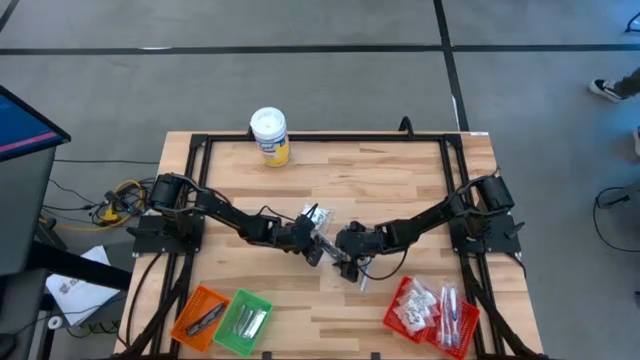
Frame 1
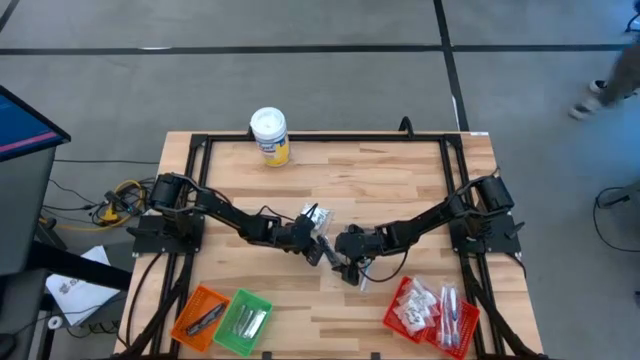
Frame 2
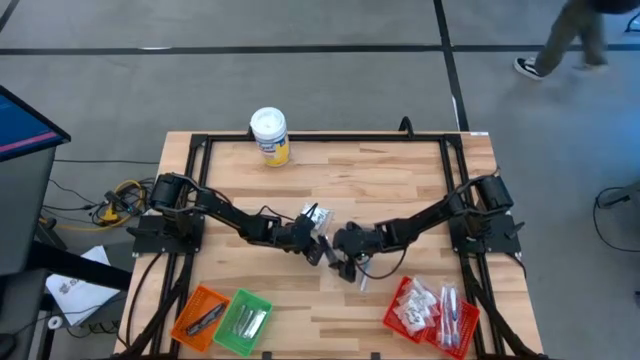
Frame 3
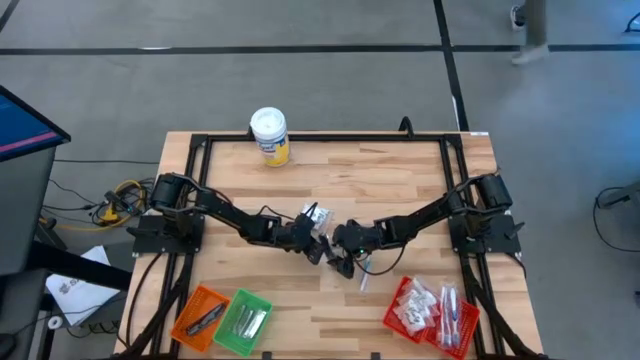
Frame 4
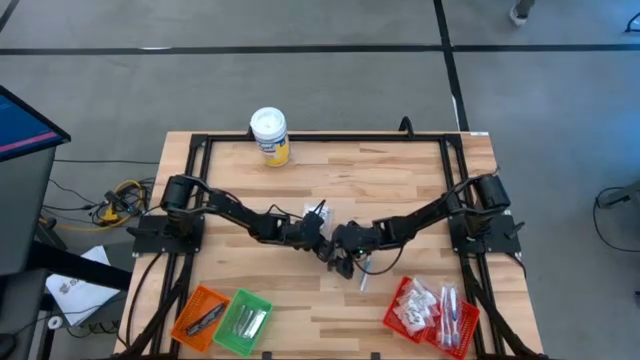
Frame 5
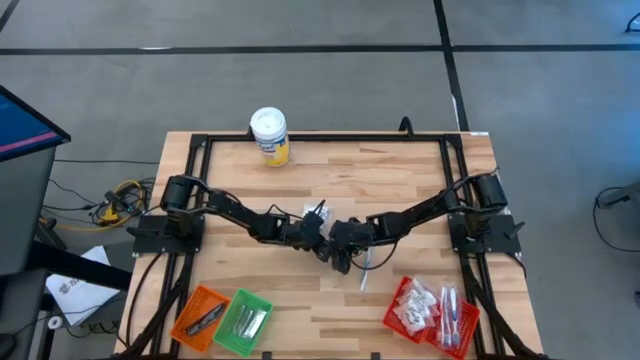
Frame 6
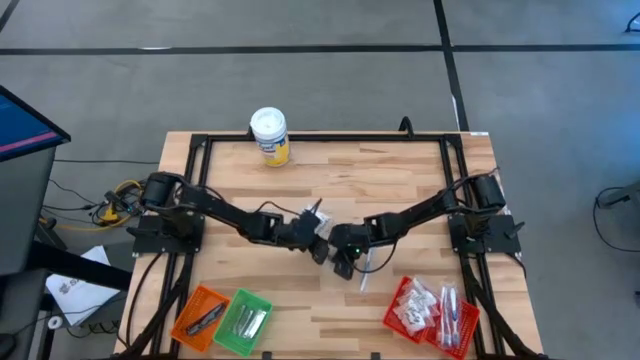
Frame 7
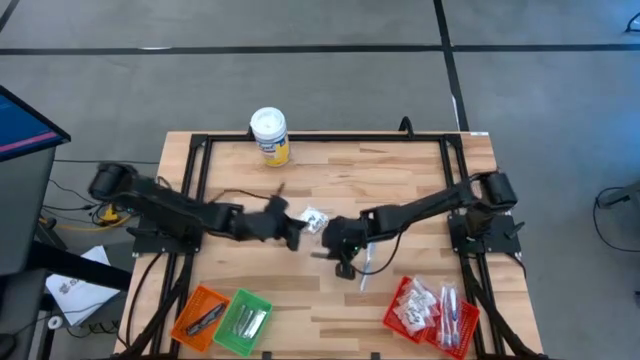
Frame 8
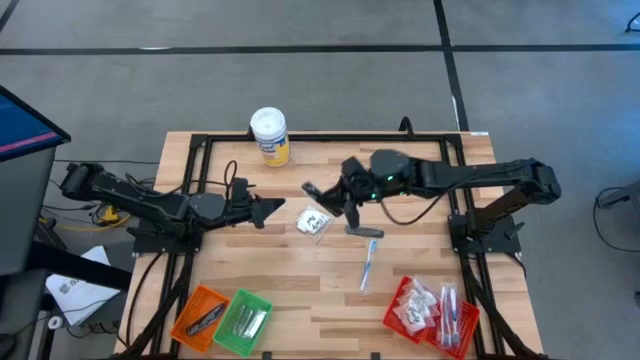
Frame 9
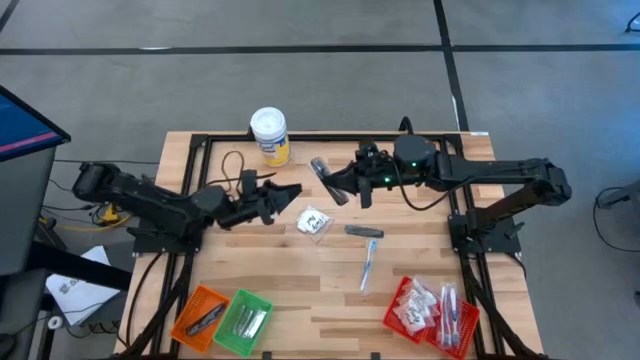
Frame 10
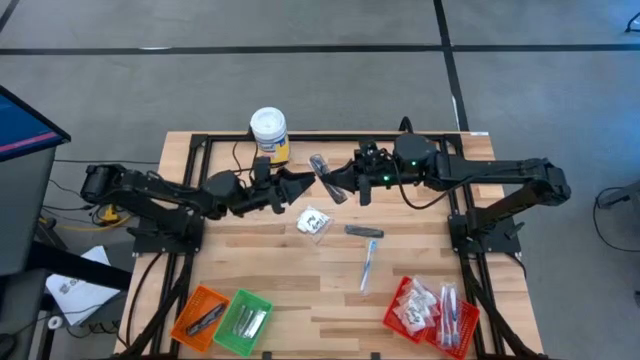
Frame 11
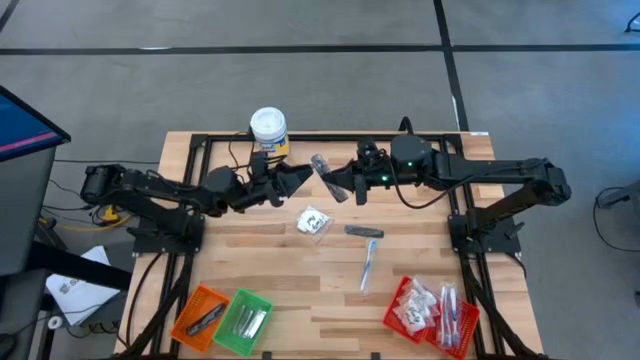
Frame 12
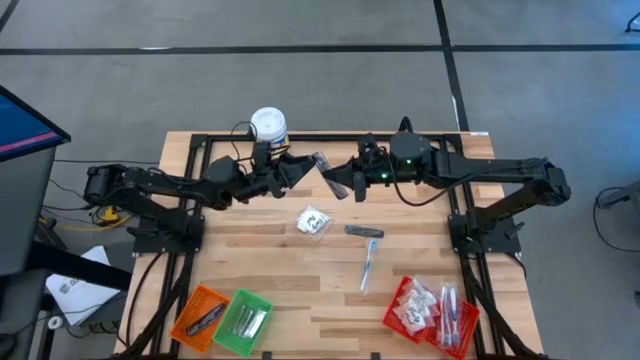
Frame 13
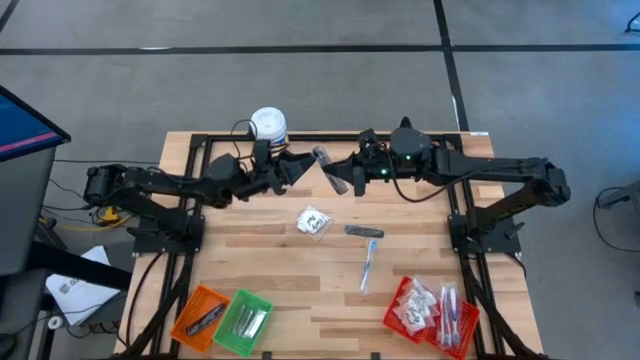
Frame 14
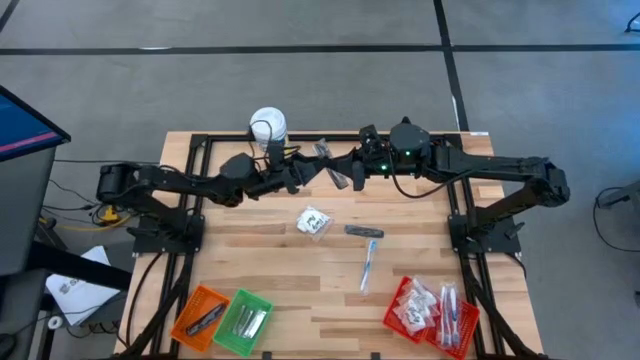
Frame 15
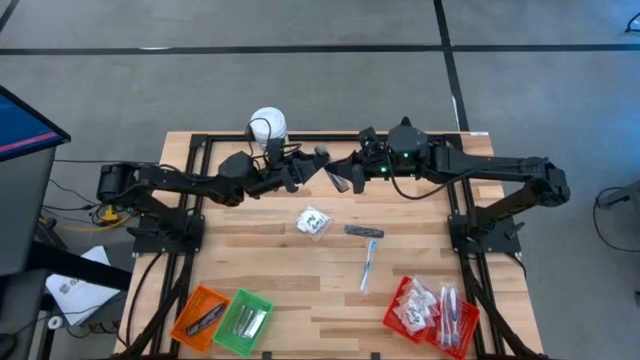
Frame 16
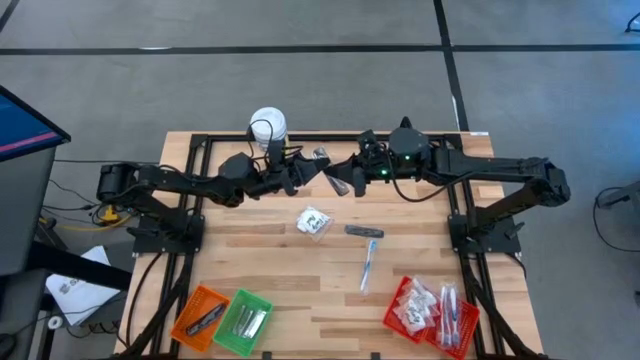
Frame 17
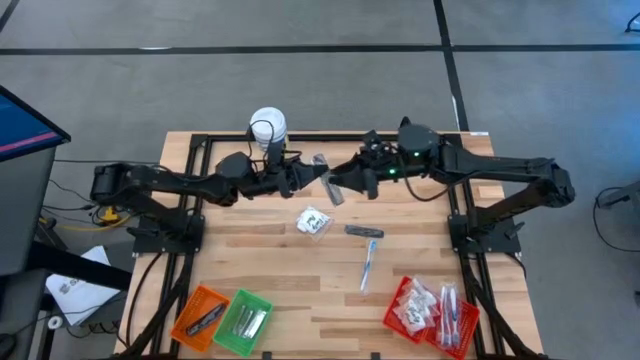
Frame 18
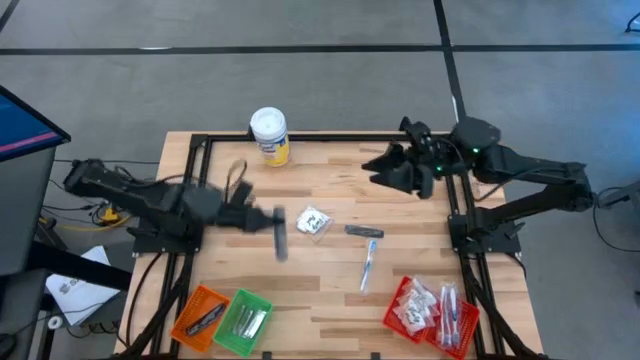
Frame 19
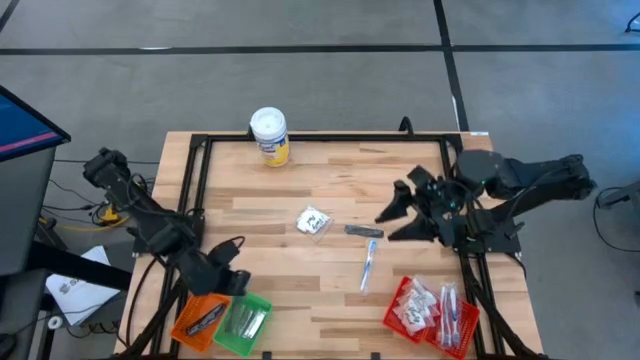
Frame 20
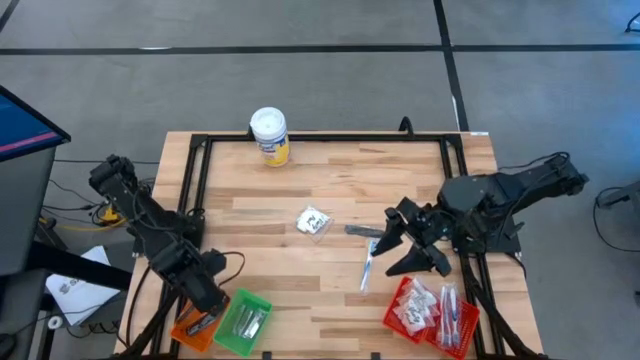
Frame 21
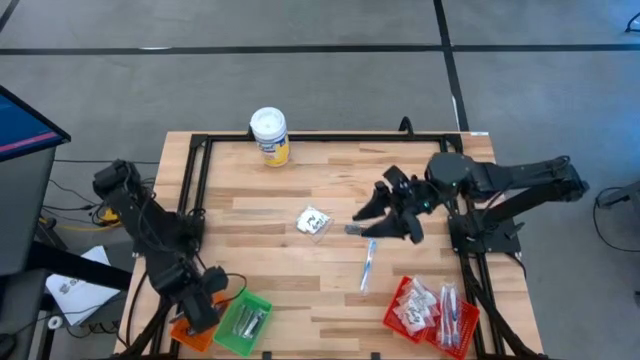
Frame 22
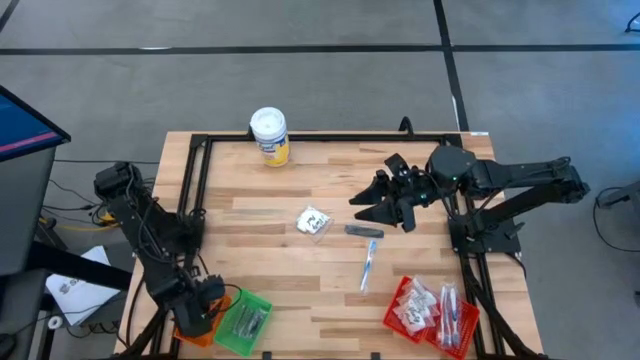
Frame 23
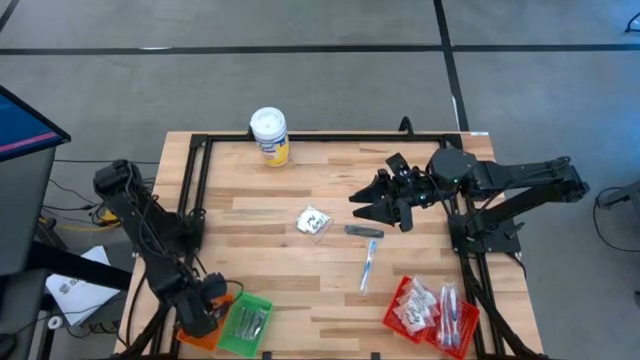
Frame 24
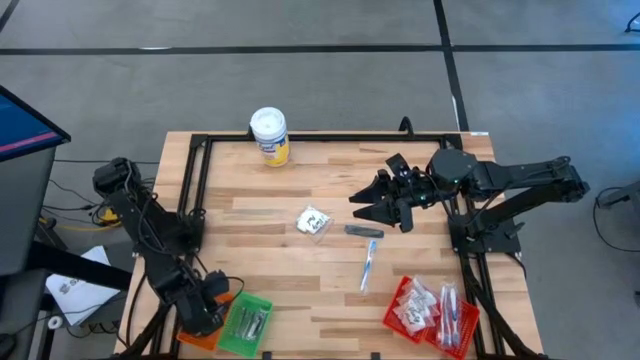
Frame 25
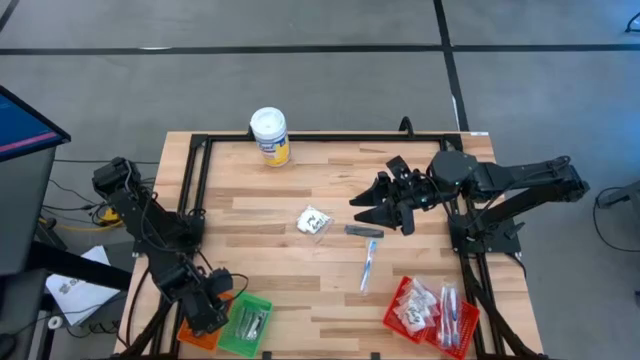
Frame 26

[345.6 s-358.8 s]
Task: Pick & Place Travel size toiletries
Put the black comb into the orange basket

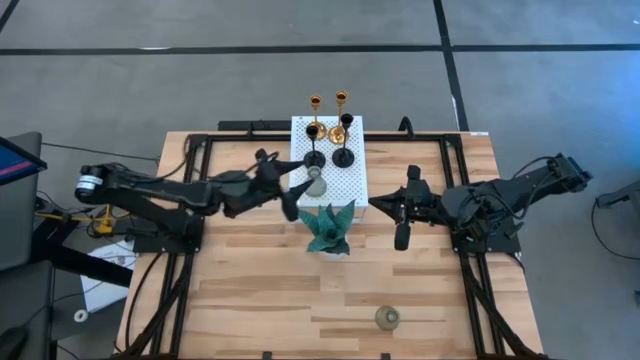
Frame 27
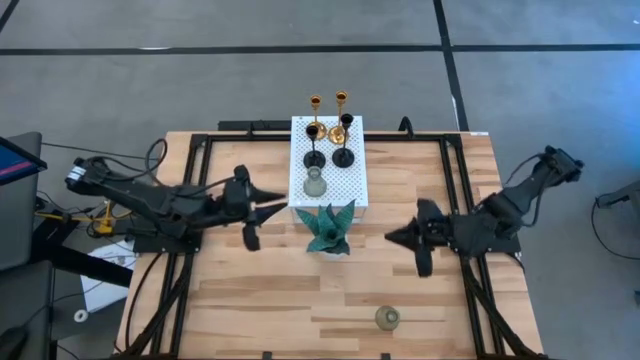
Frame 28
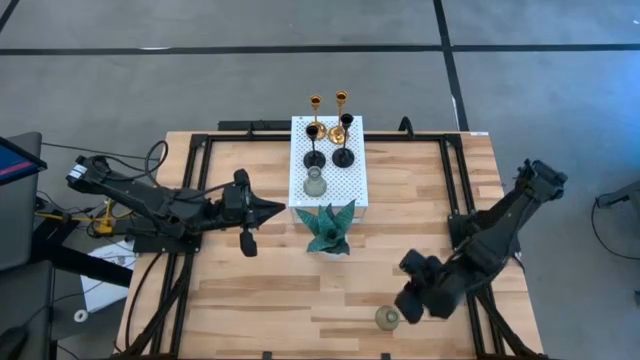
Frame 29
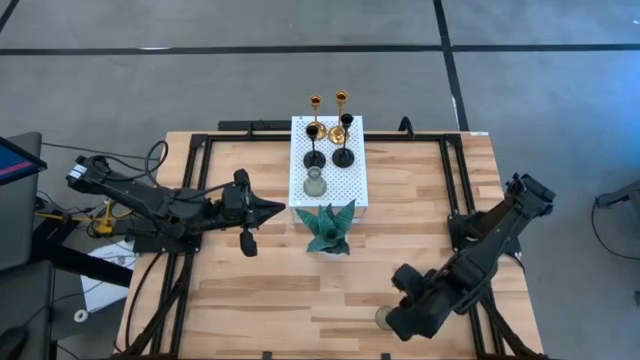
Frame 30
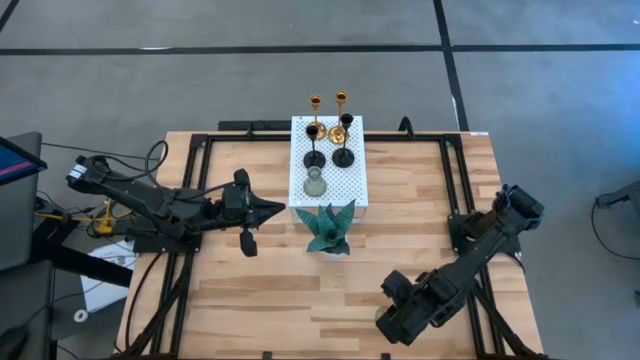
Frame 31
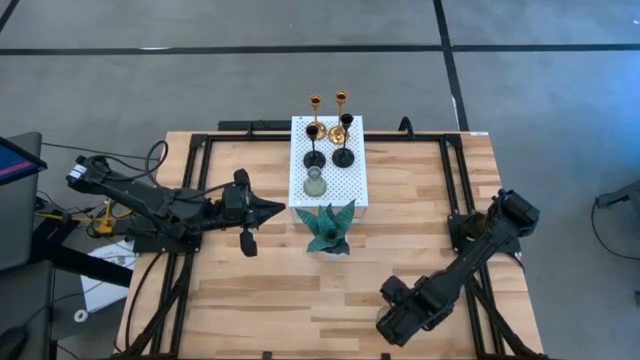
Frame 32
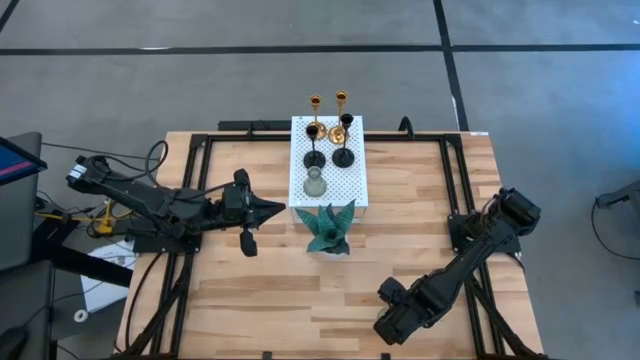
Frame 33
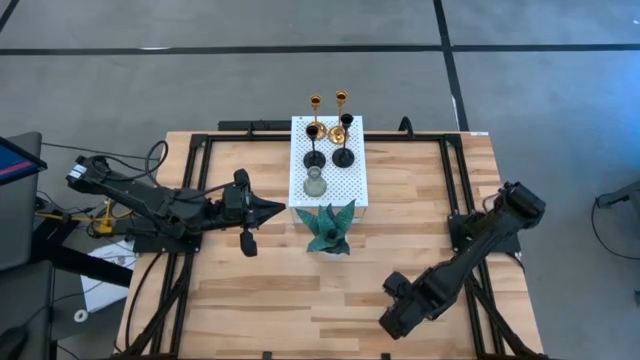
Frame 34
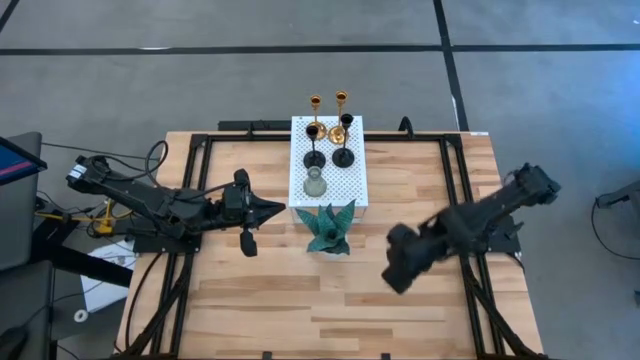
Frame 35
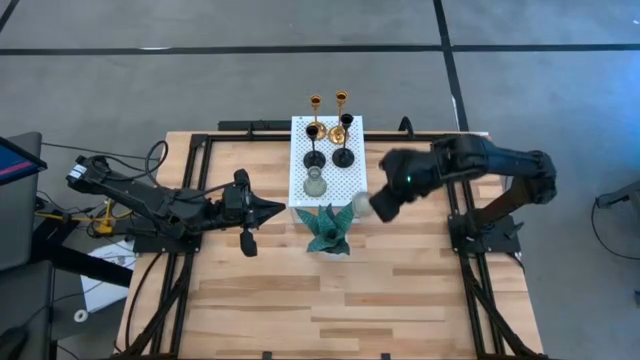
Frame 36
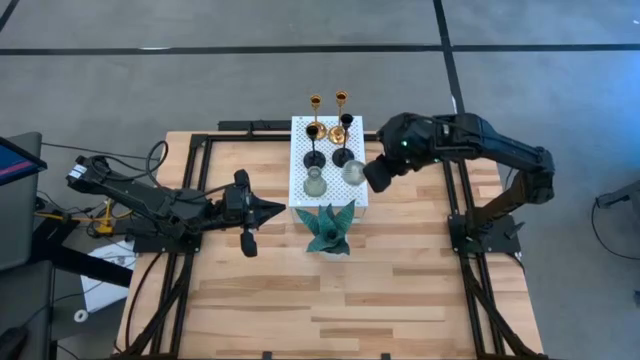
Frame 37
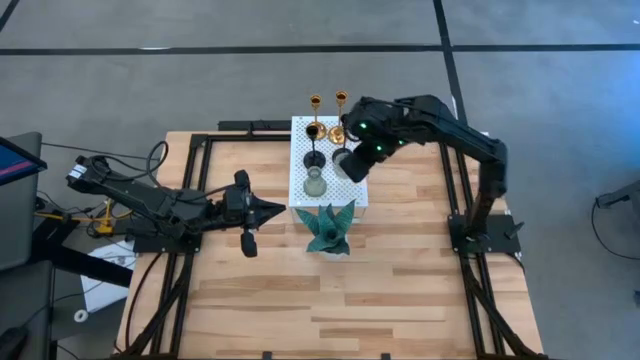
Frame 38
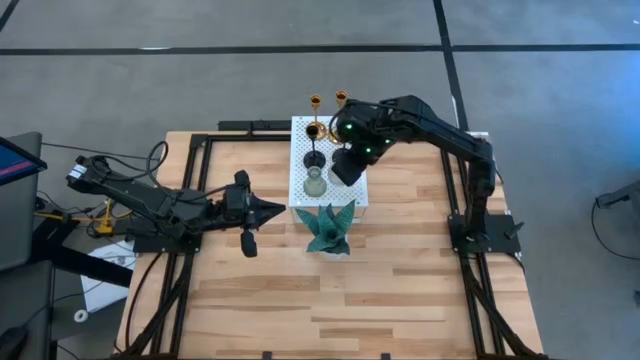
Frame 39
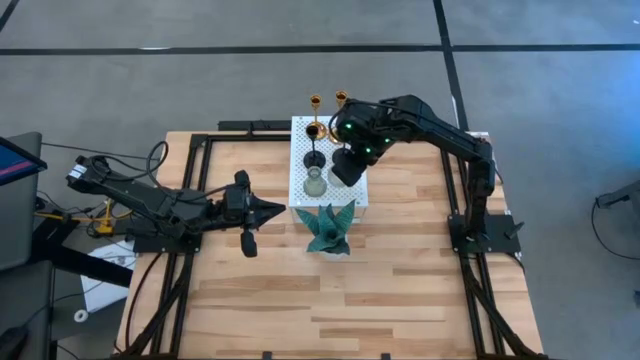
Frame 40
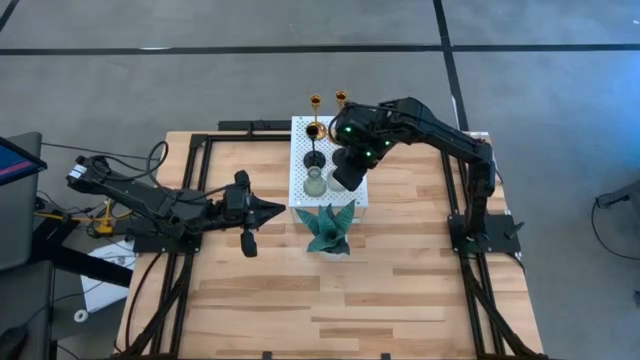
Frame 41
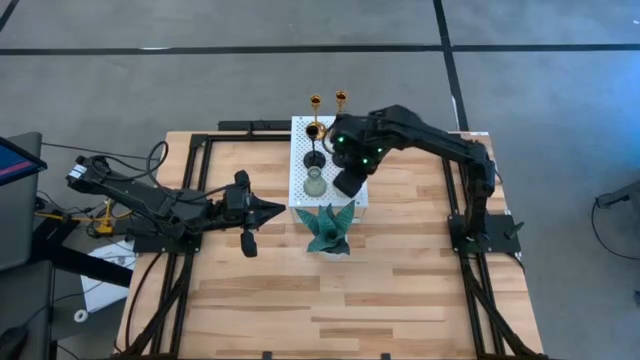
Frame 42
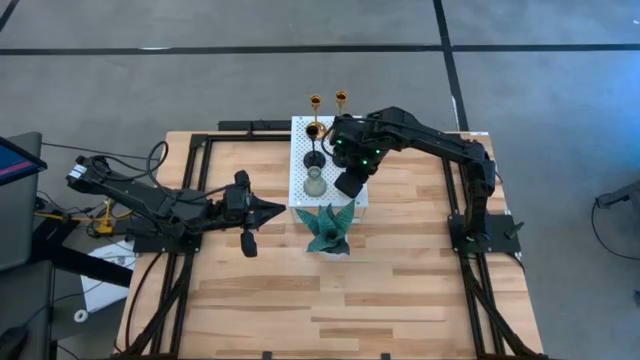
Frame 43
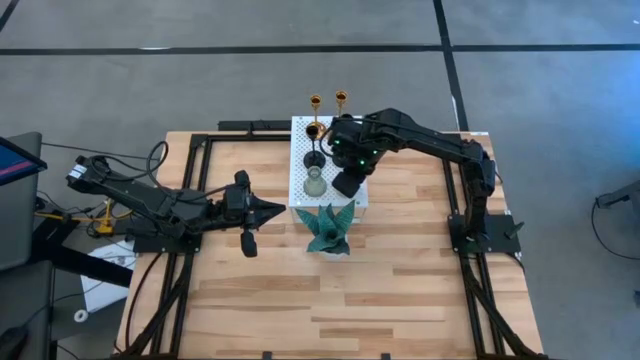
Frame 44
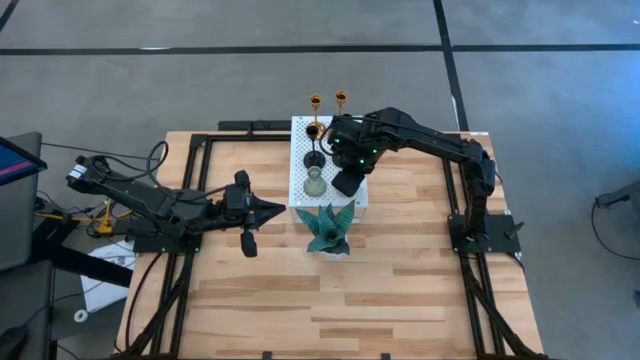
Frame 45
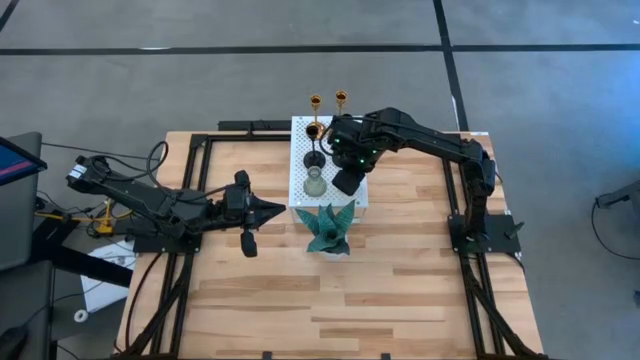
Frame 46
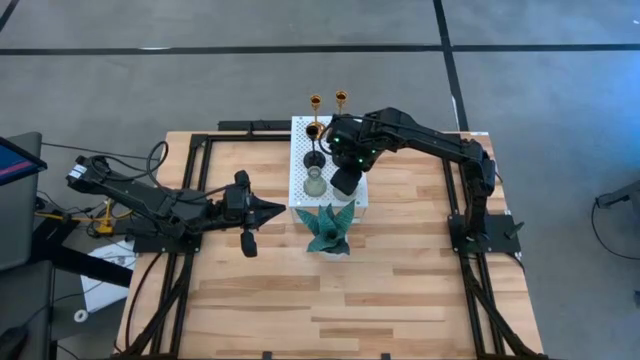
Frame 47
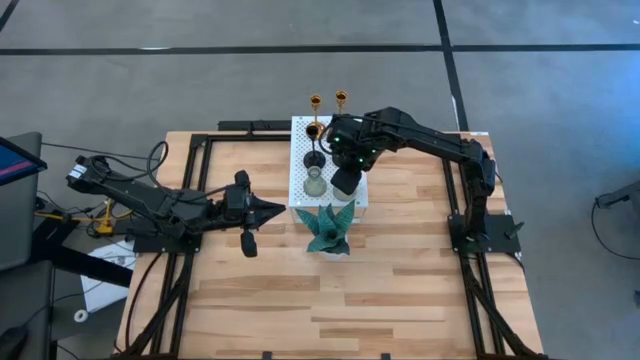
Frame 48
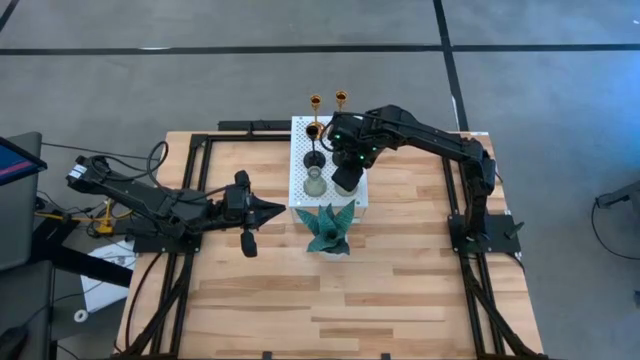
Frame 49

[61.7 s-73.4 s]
Task: Pick & Place candle stick holders
Put the transparent candle holder on the shelf aligned with the transparent candle holder
